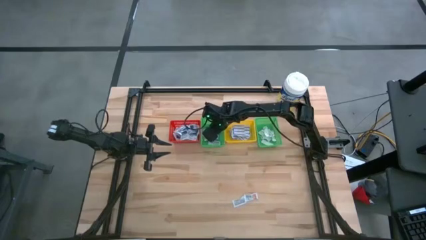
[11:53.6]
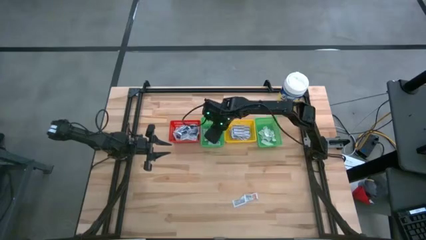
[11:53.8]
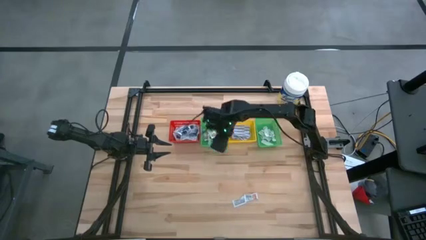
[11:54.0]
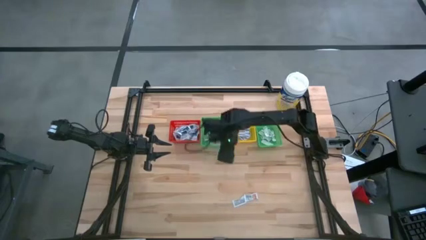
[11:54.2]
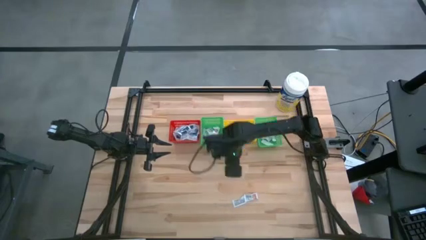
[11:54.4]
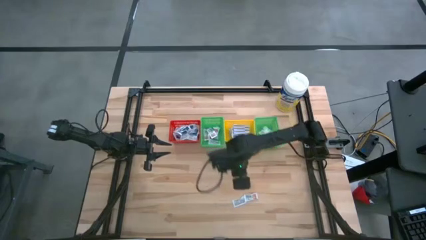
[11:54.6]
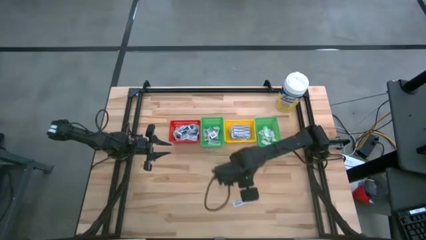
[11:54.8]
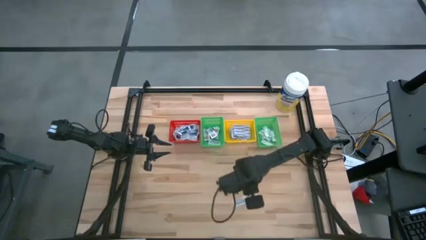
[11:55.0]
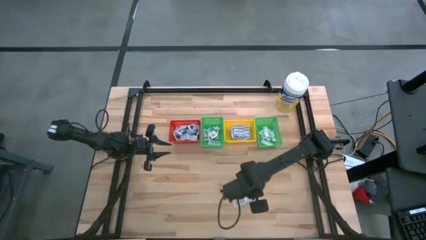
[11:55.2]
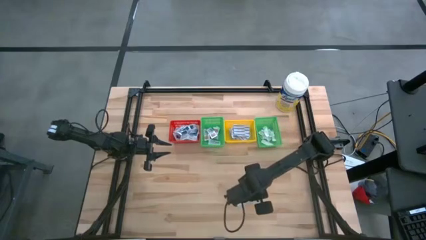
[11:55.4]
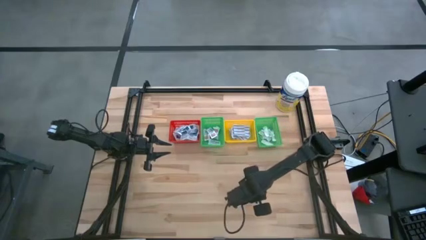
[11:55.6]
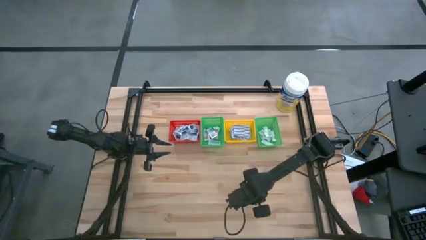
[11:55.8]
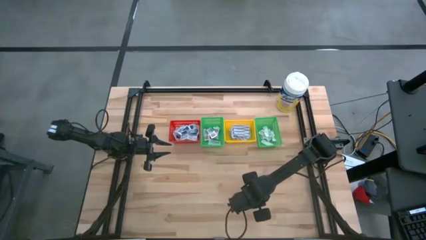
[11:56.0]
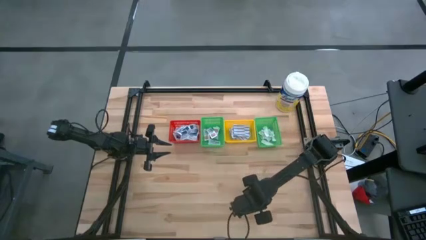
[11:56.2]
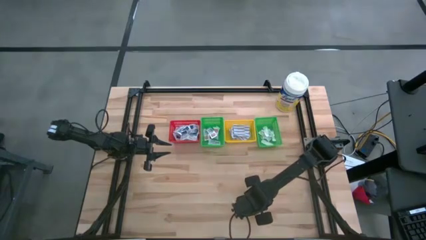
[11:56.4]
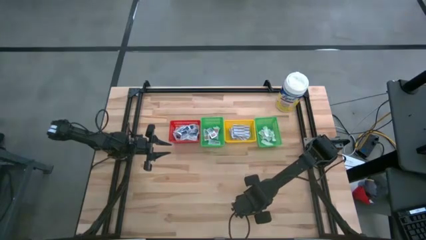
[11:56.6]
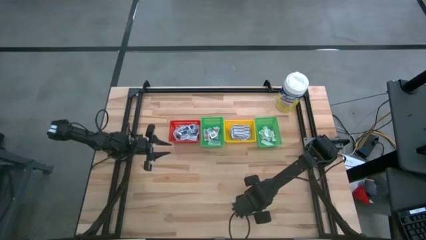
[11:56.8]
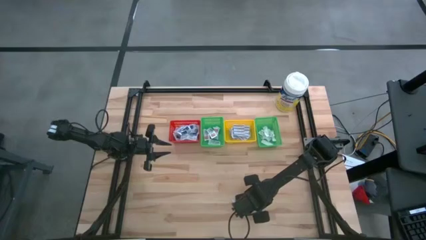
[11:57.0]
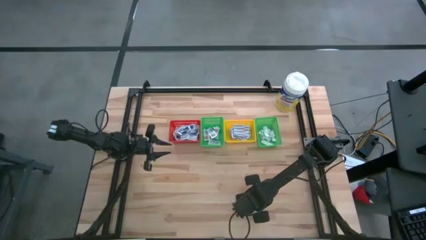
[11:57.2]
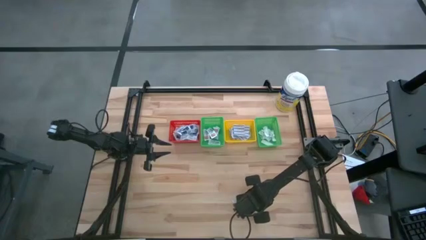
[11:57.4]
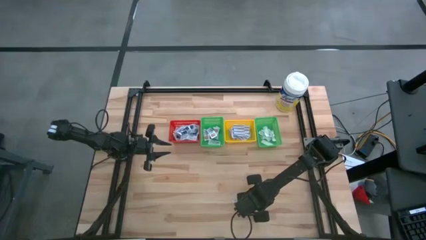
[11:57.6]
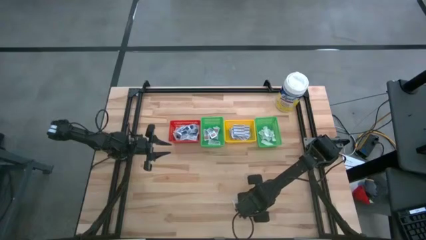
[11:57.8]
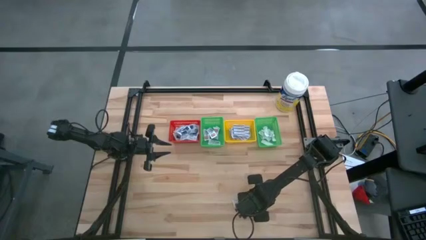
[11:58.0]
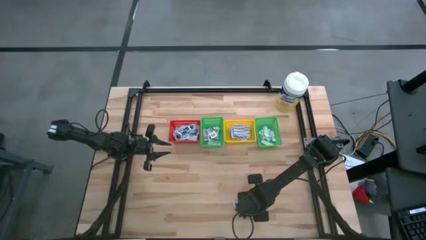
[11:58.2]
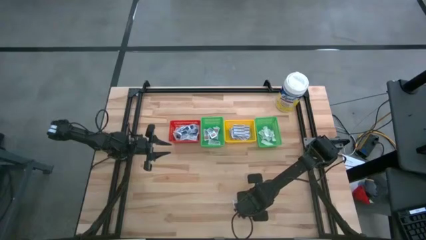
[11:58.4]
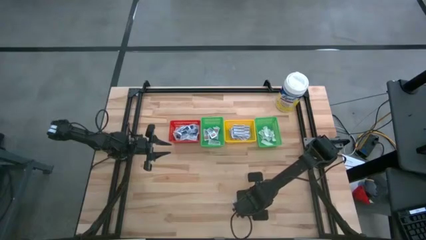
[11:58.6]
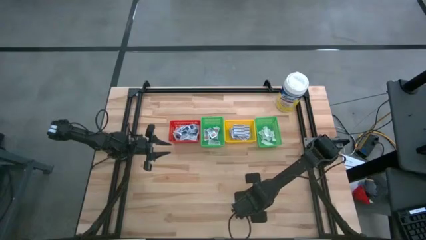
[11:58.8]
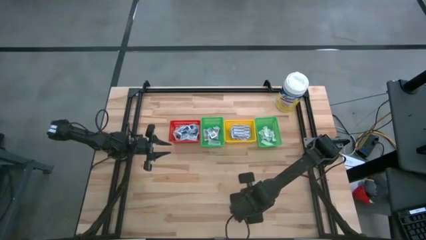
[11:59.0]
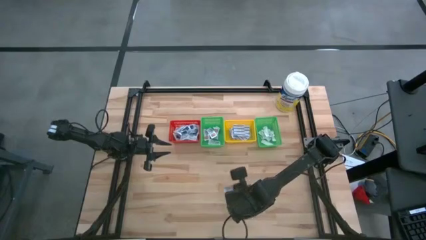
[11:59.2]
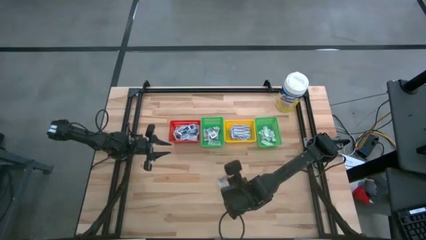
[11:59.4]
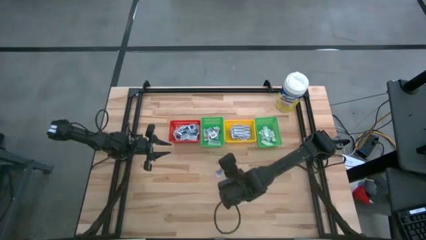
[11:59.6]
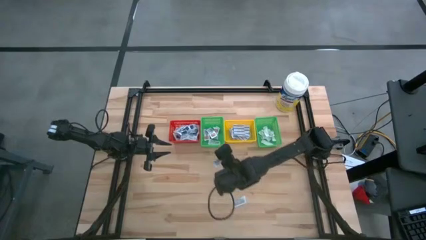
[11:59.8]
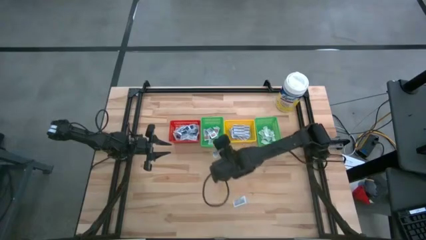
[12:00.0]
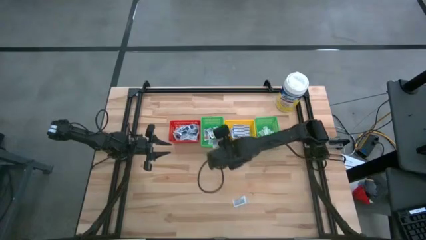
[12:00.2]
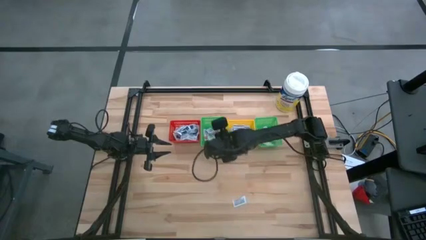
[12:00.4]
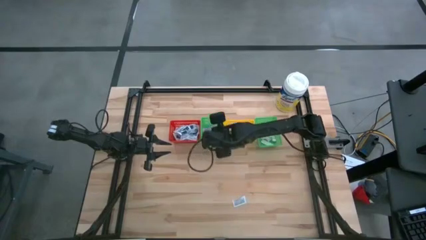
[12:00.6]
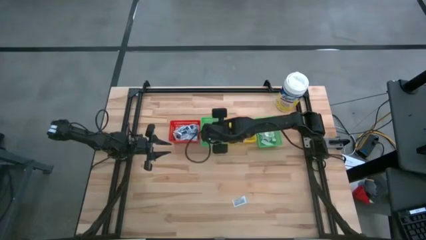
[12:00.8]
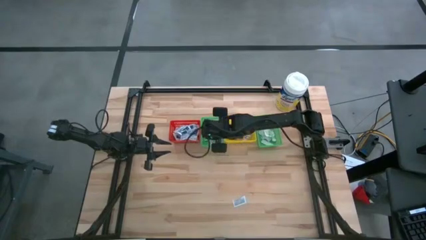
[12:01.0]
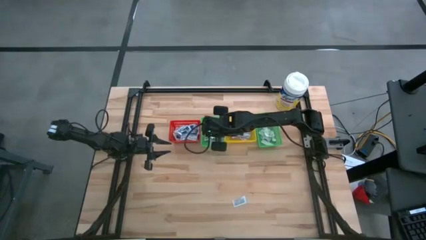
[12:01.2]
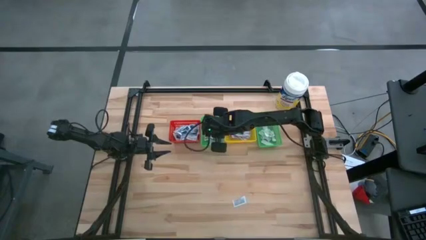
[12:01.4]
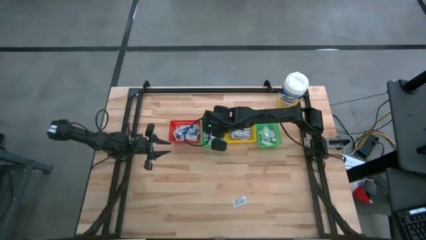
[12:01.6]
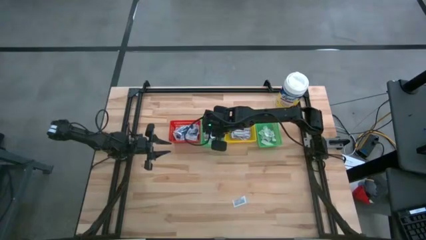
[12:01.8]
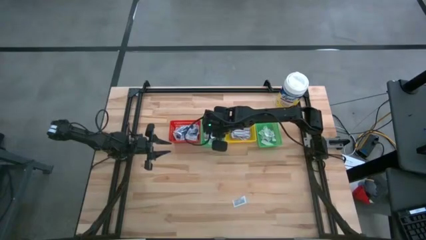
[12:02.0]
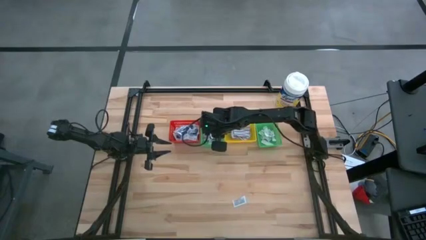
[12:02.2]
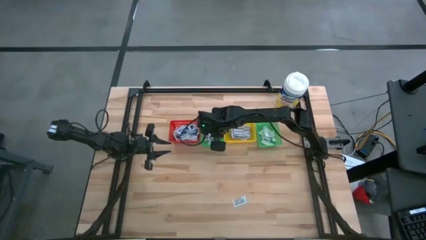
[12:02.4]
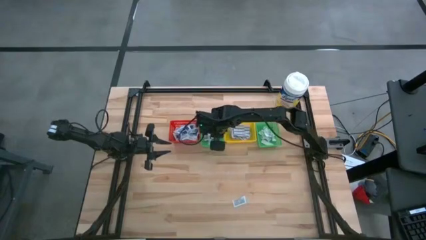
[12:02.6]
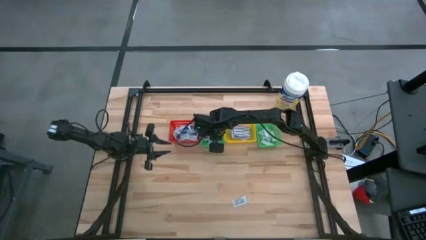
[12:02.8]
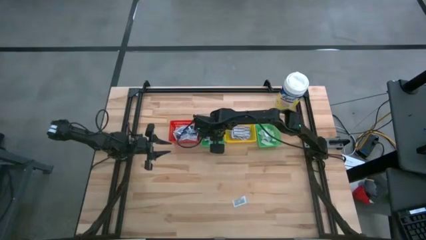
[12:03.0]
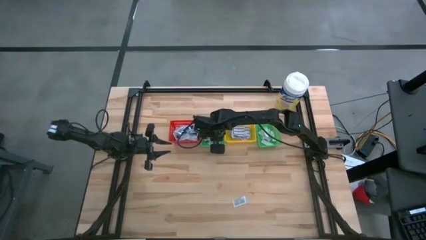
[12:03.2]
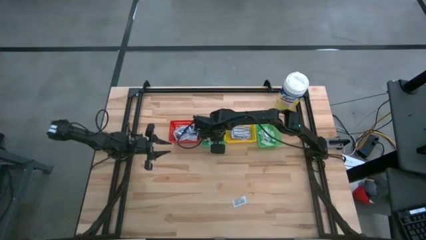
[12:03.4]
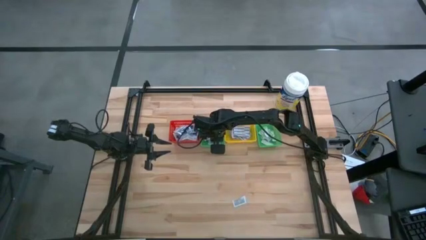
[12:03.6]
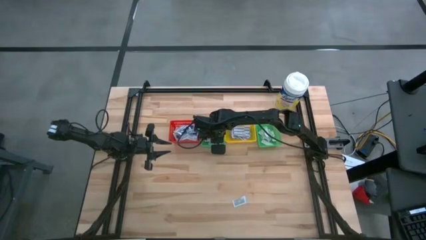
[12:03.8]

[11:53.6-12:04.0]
Task: Pick & Place First Aid Supplies
Put the ointment pack into the left green basket

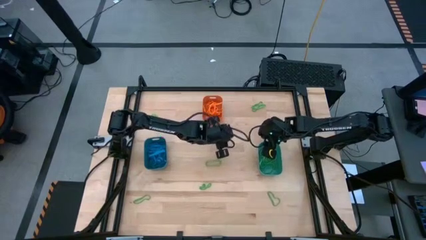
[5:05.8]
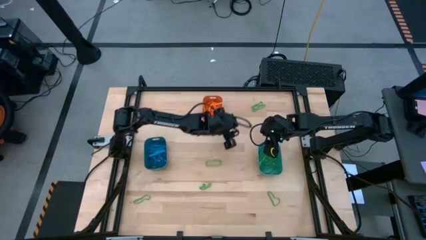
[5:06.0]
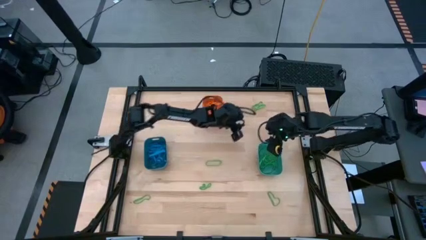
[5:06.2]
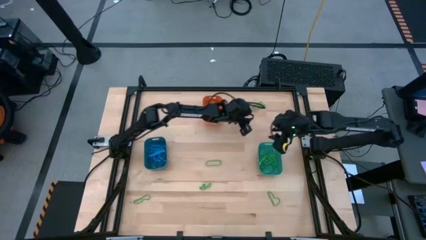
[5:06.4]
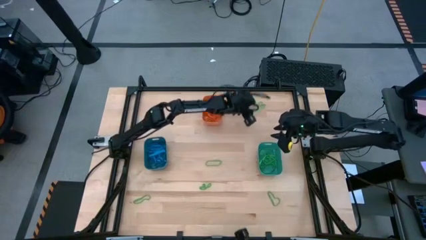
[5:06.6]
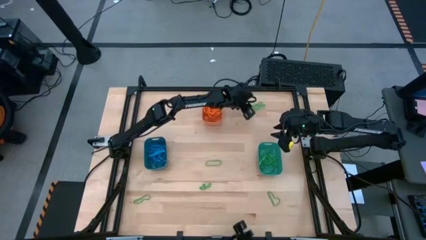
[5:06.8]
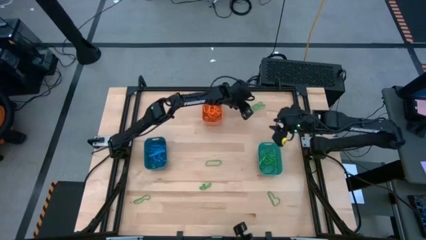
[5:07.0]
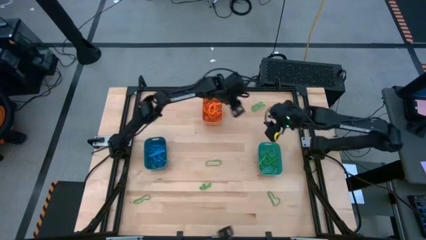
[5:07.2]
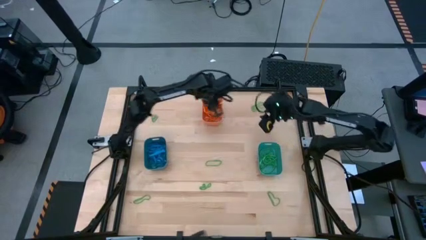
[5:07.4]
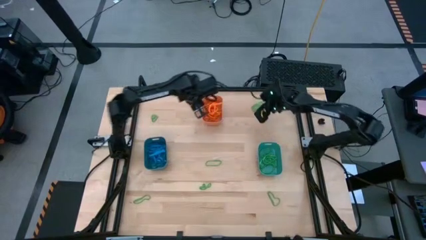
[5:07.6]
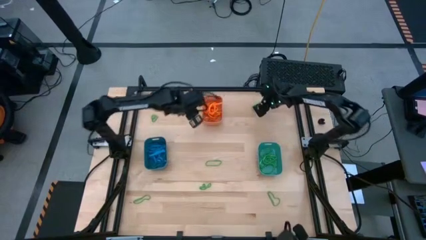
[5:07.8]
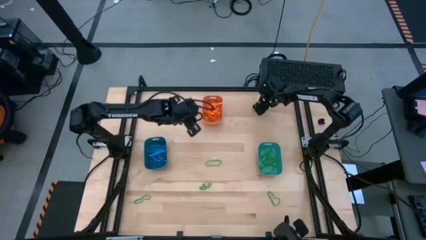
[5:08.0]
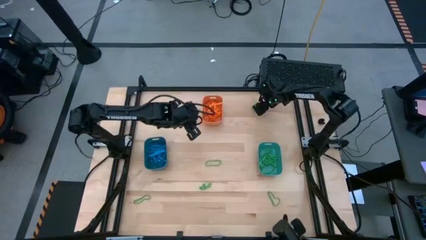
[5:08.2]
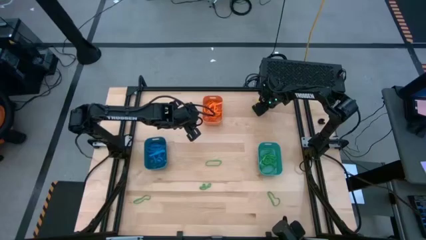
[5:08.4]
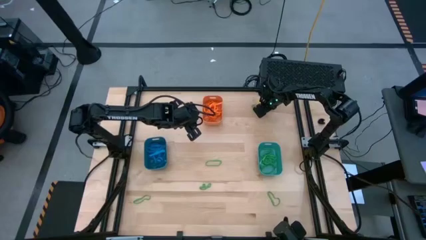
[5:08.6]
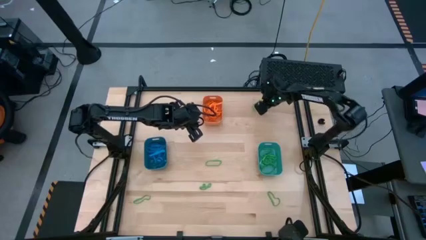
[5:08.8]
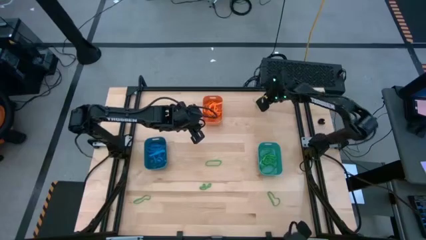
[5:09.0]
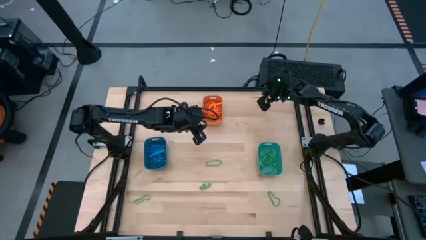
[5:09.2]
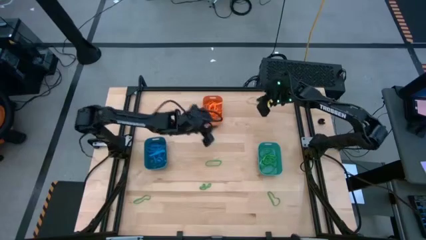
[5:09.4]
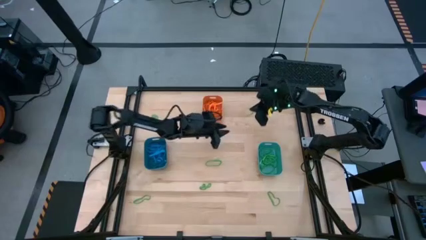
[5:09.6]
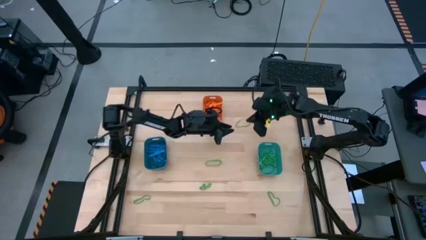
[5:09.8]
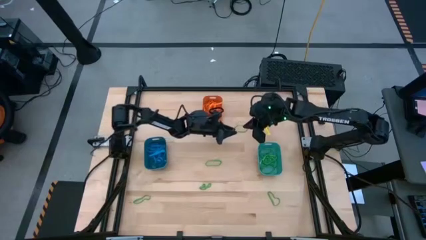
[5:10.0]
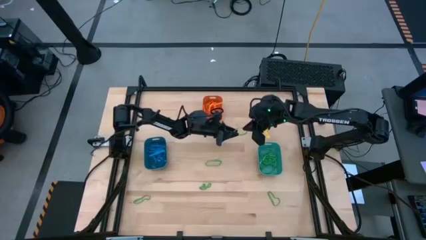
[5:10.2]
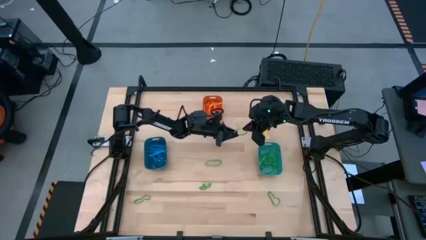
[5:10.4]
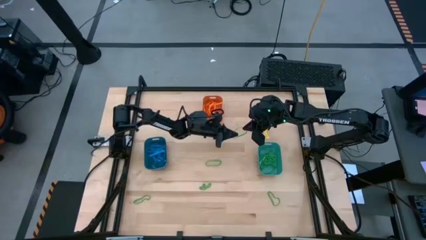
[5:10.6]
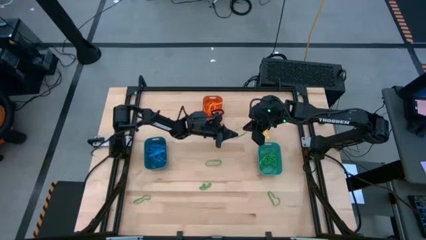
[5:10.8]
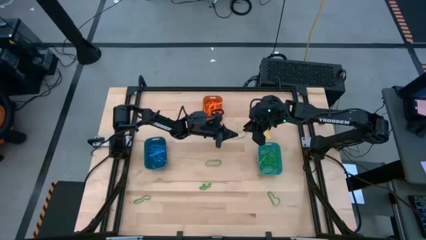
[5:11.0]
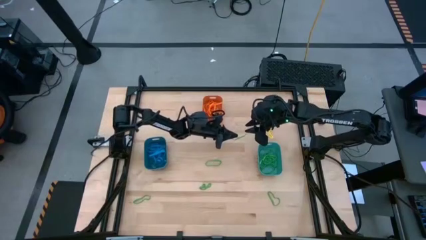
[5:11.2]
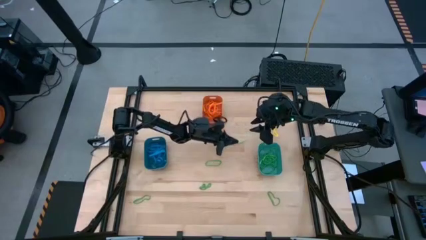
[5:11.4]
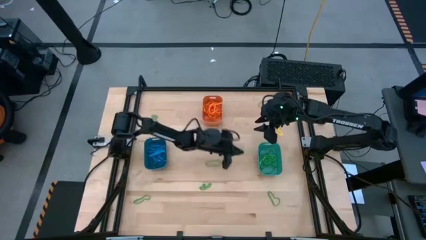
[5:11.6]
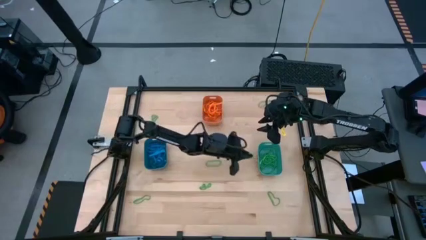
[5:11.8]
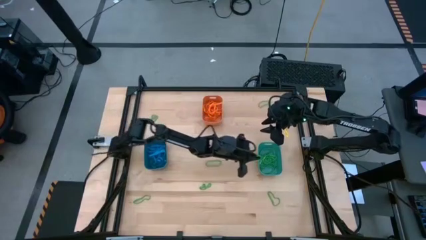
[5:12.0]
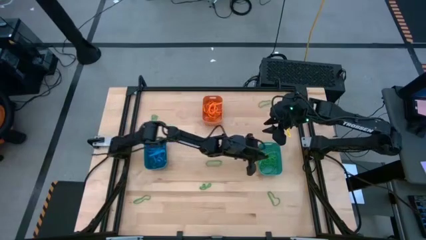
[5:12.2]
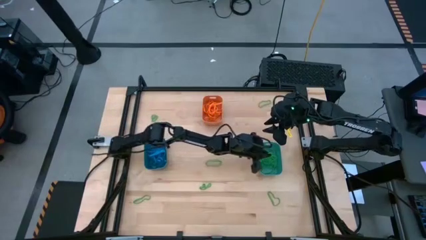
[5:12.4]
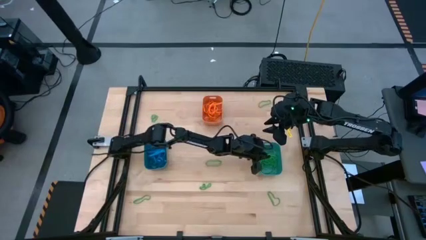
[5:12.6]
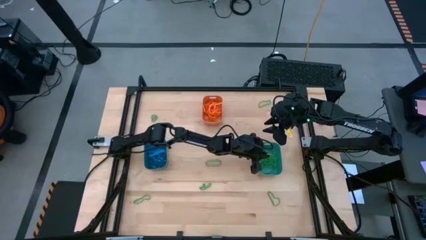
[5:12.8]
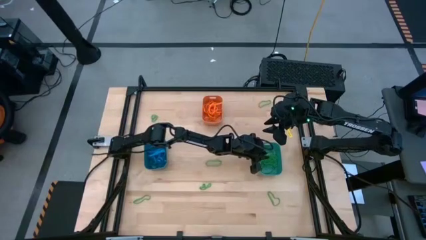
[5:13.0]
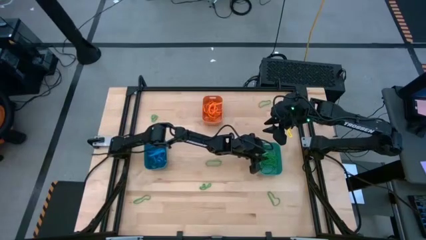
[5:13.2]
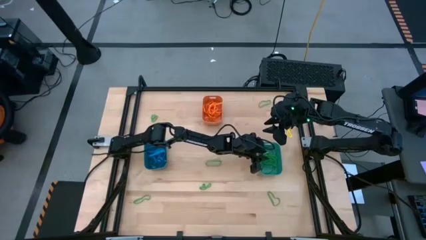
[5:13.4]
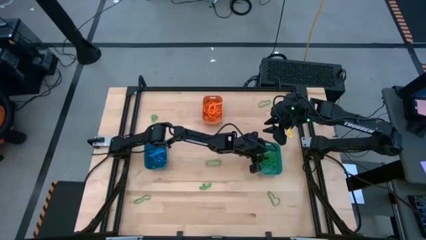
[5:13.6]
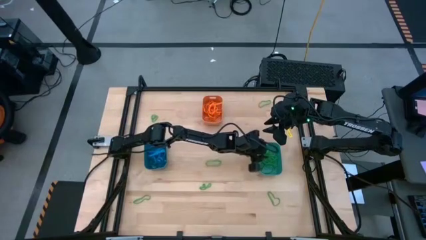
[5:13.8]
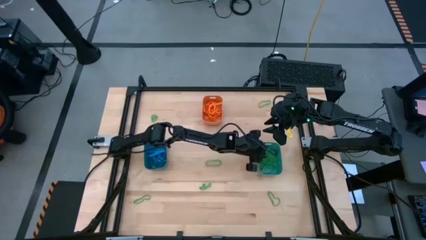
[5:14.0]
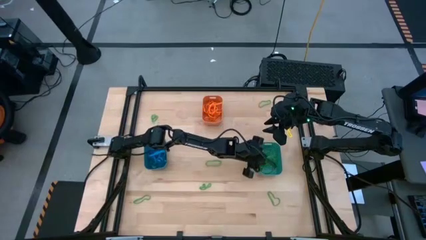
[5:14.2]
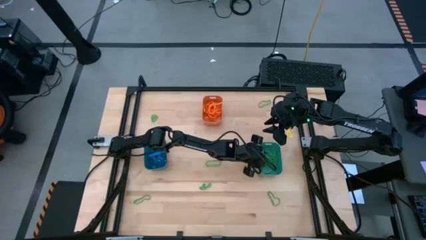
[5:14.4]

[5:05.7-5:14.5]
Task: Sort rubber bands into baskets
Put the green rubber band into the green bin
